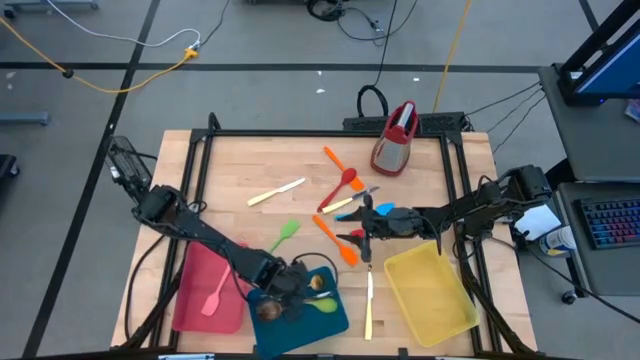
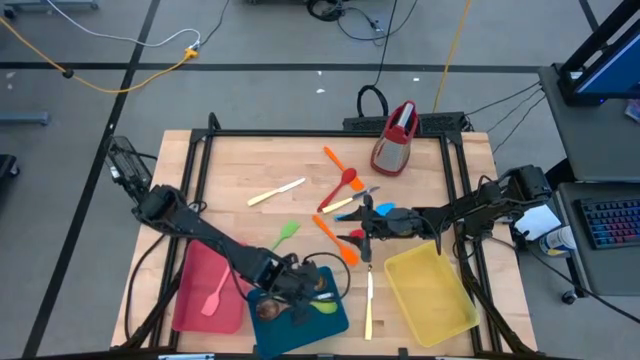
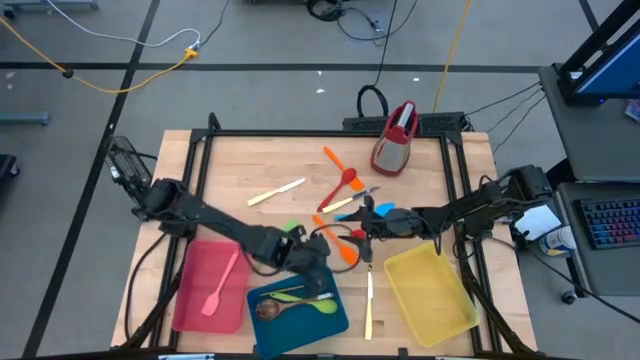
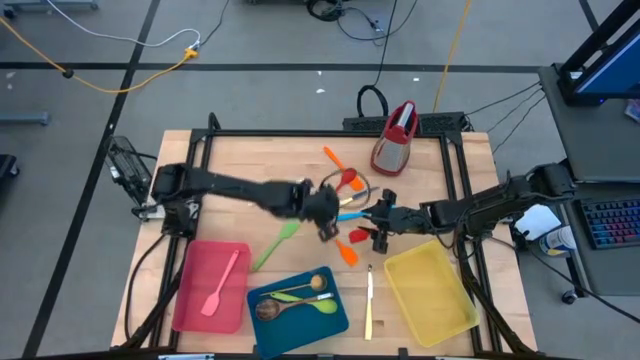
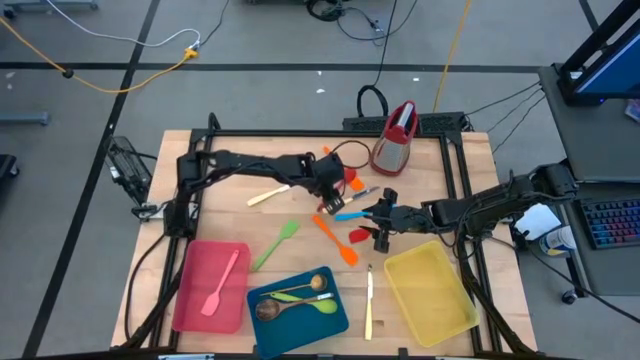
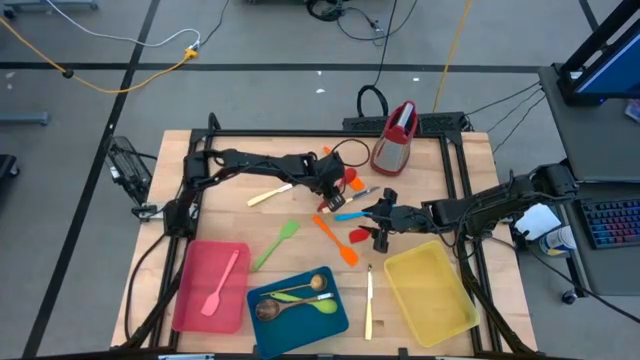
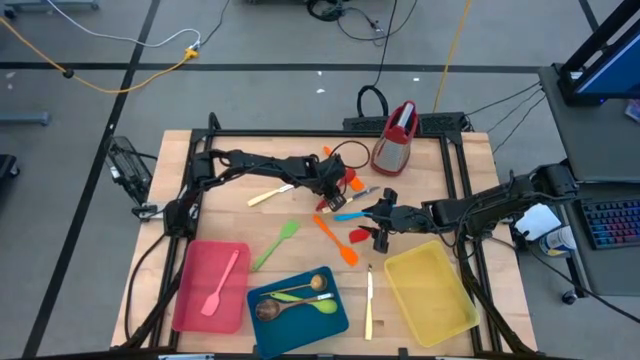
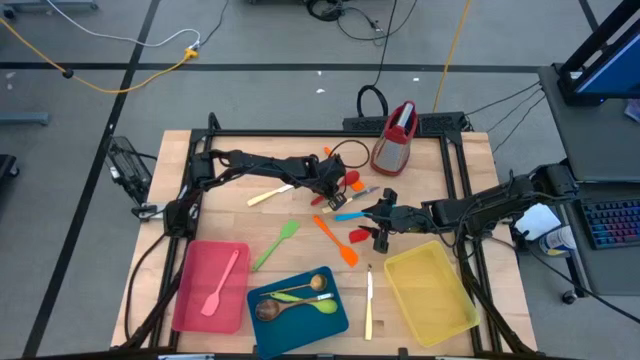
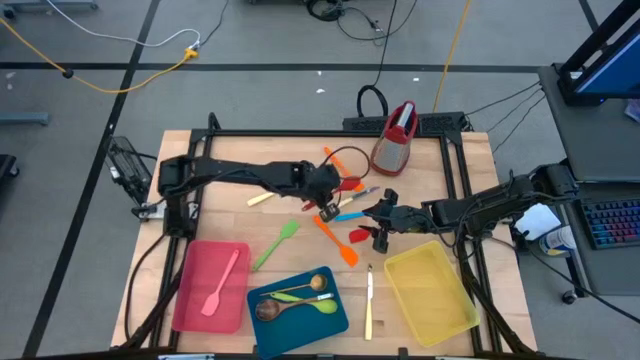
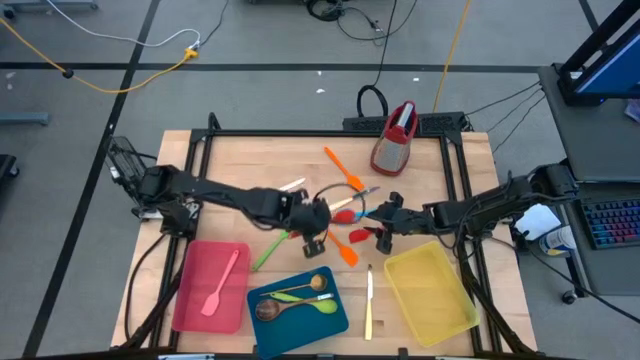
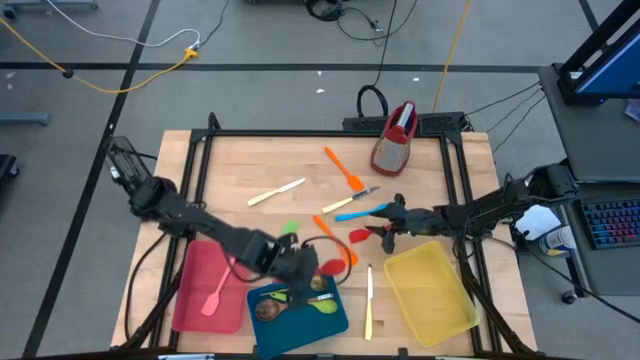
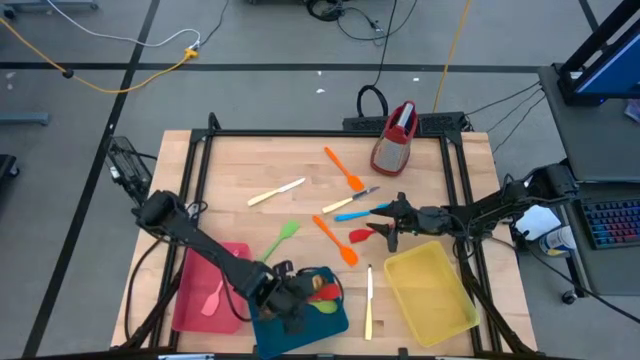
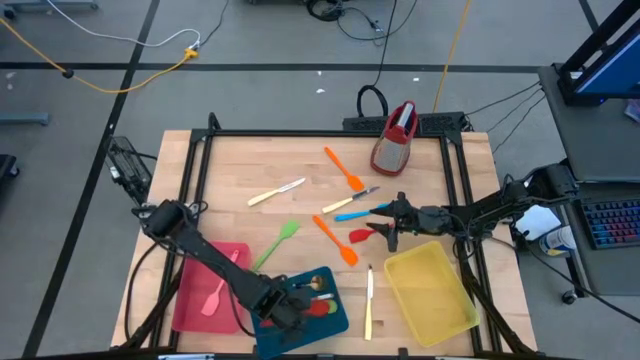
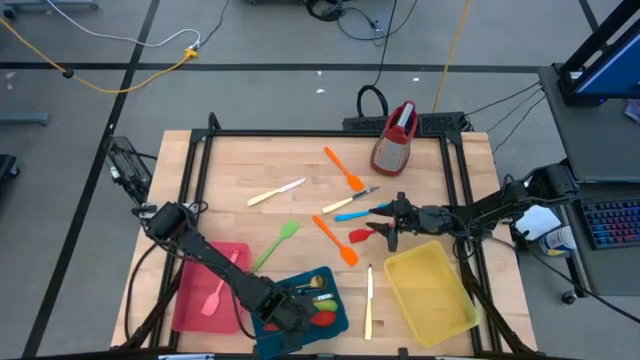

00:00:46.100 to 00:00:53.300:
Task: Pick & Place Kitchen Items
Put the red serving spoon into the blue bin

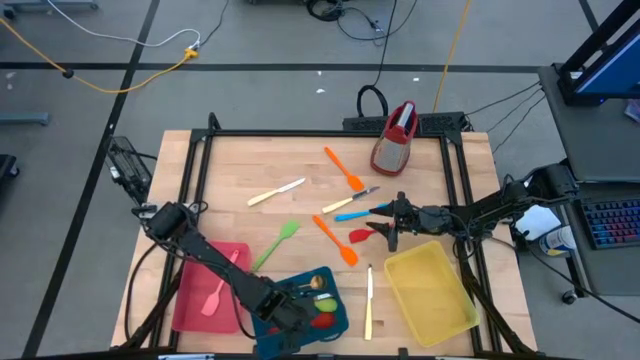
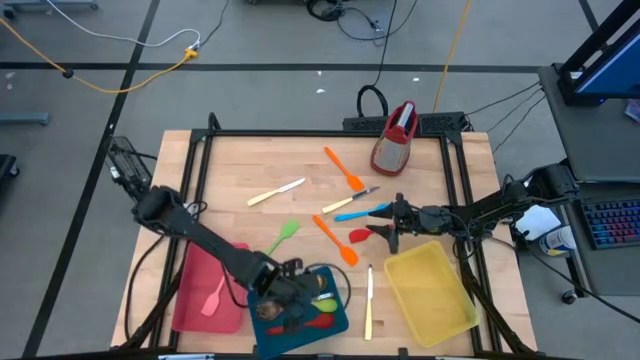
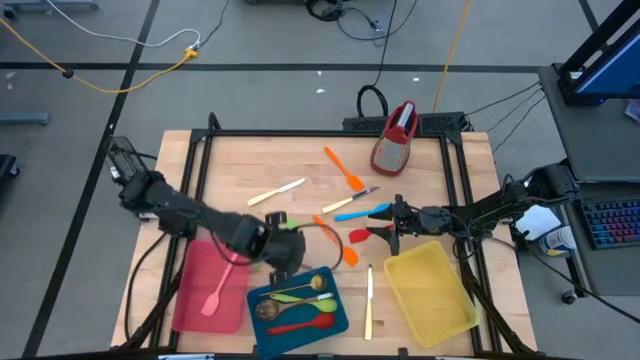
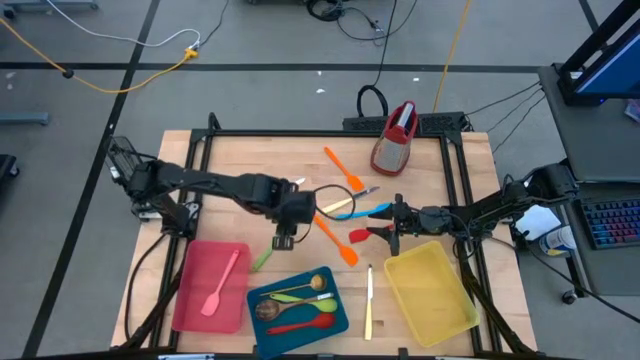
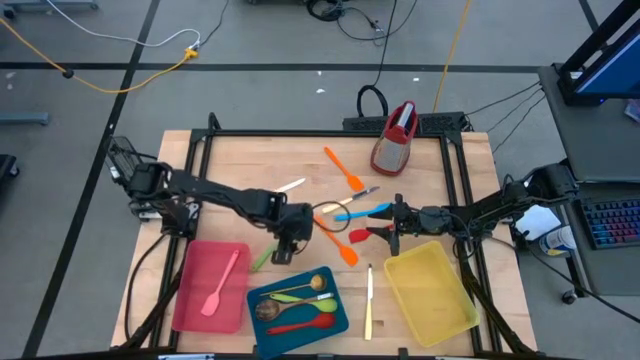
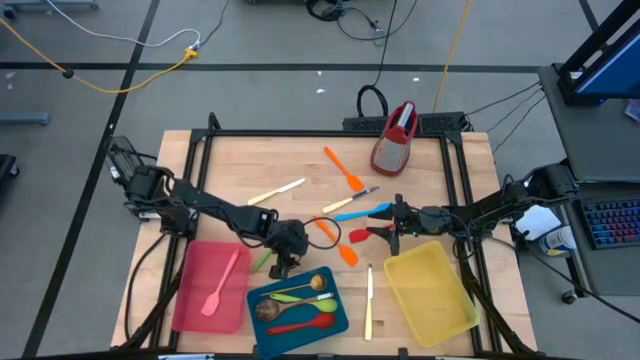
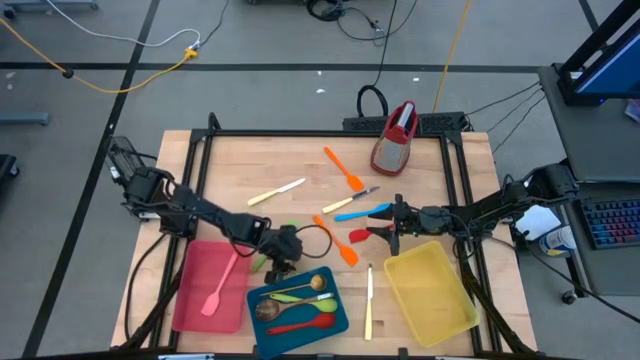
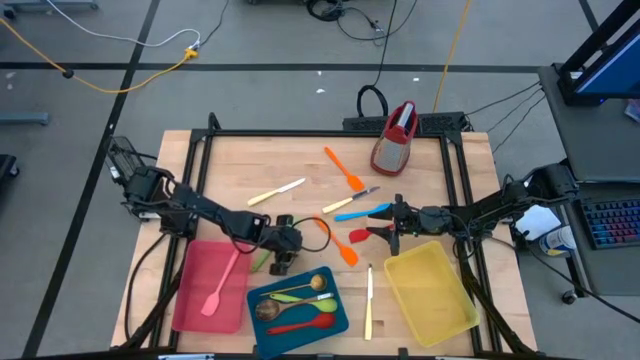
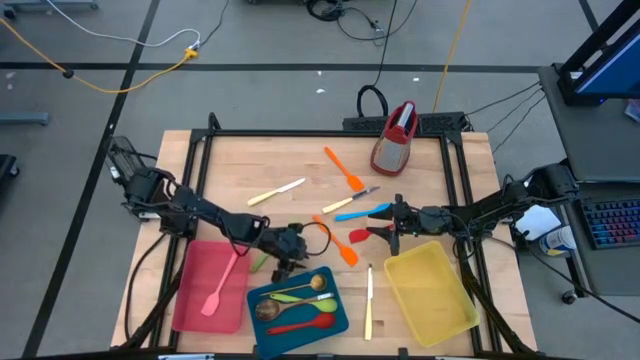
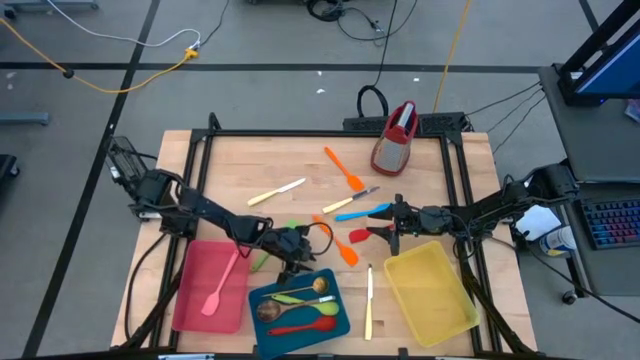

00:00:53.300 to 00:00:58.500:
Adjust the blue bin

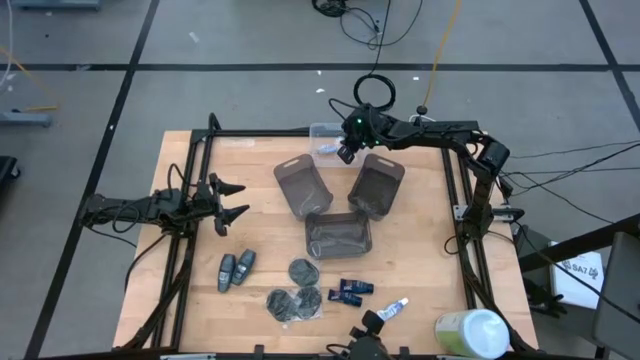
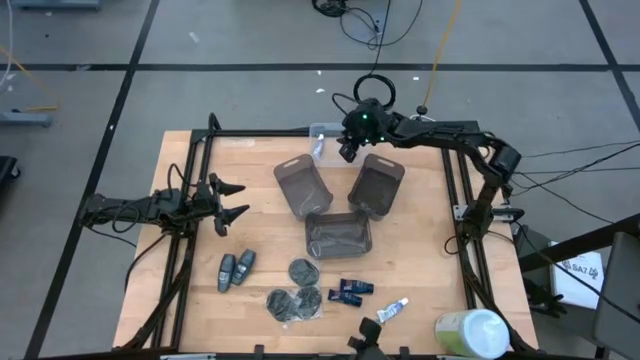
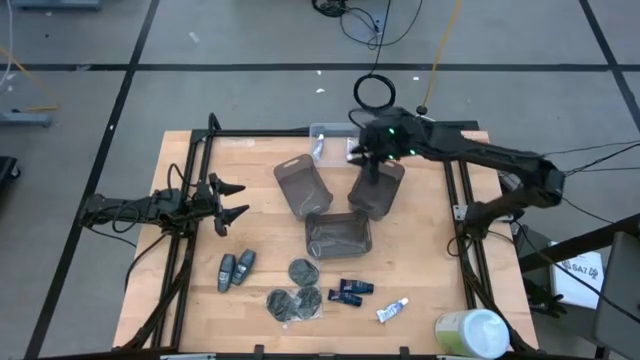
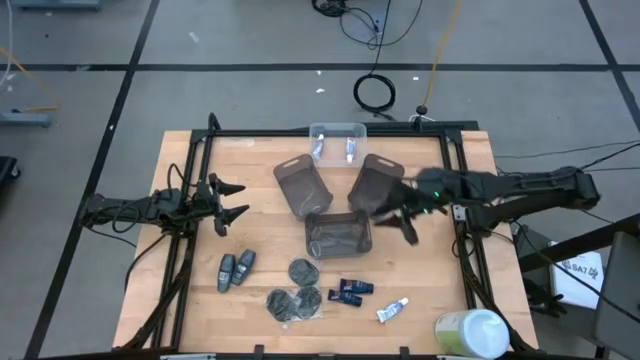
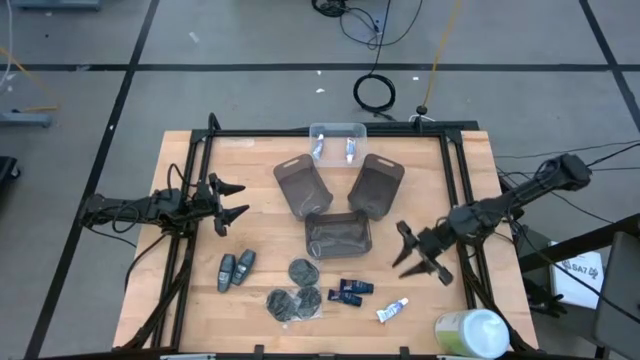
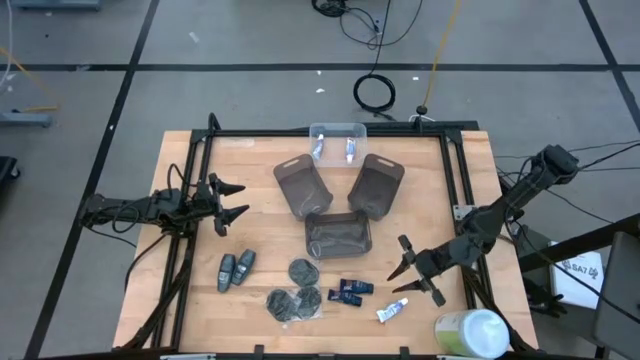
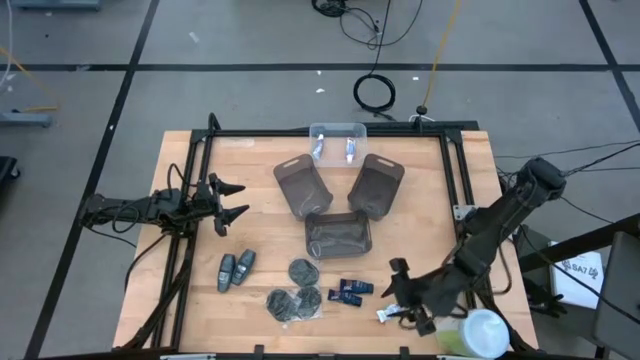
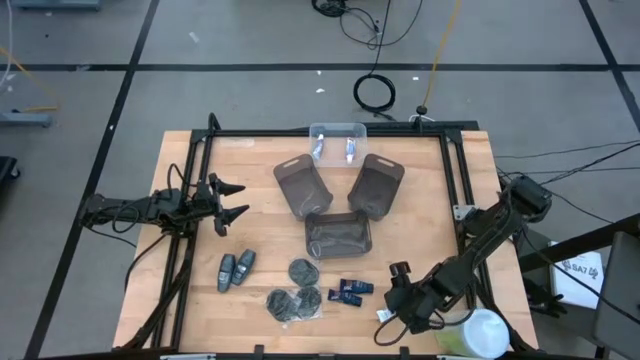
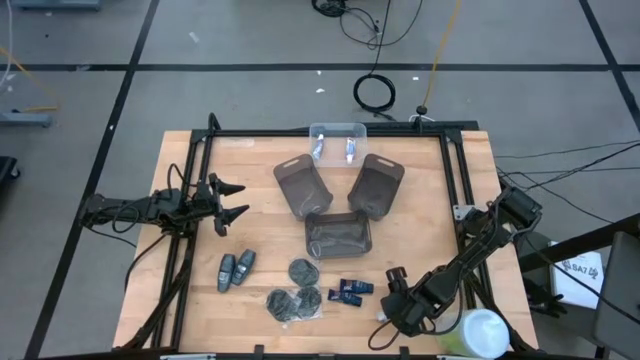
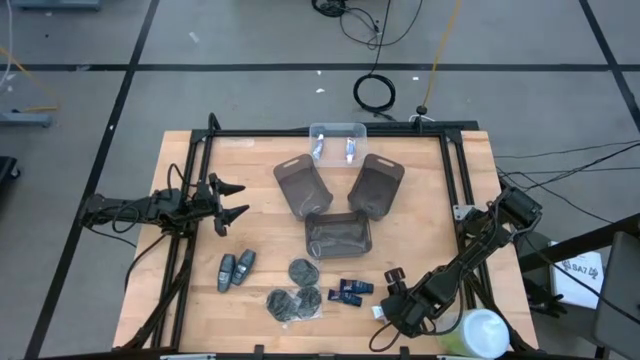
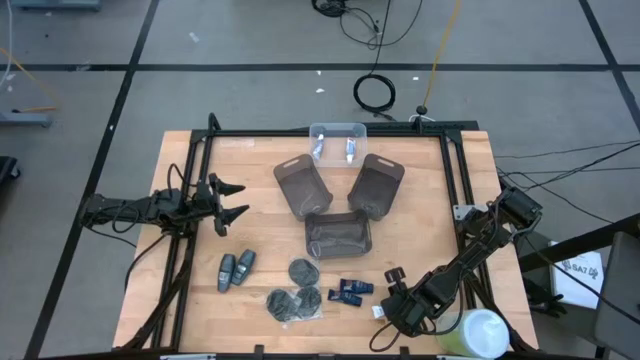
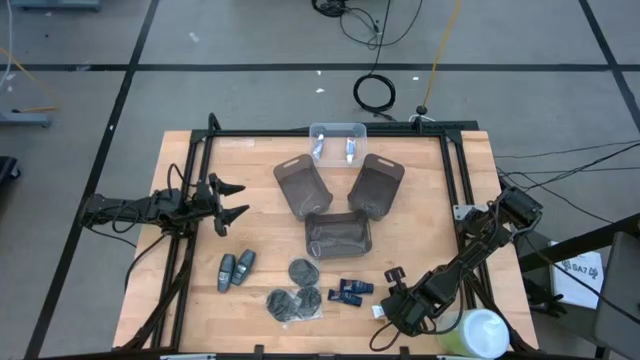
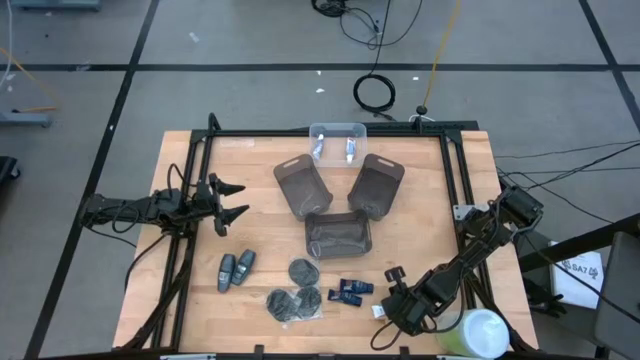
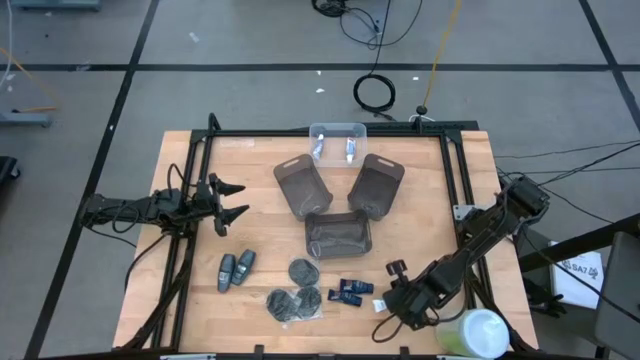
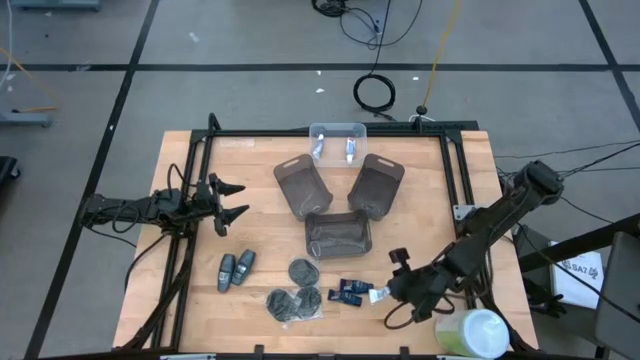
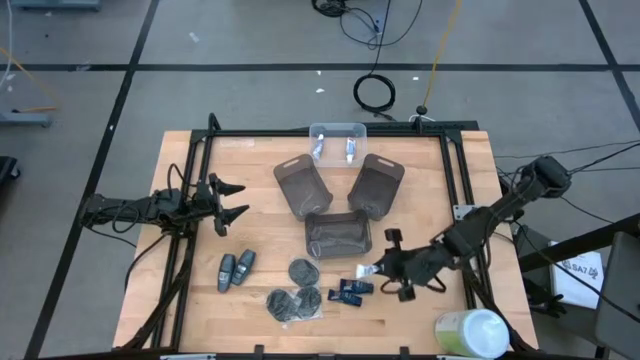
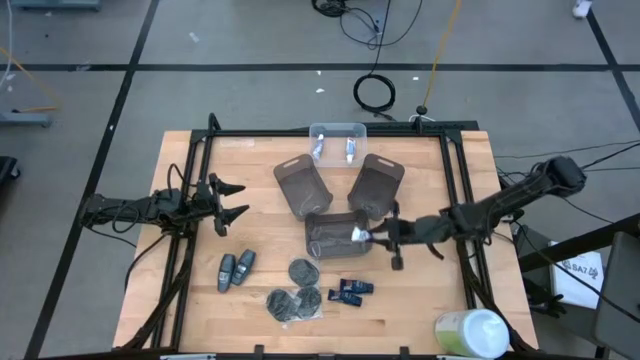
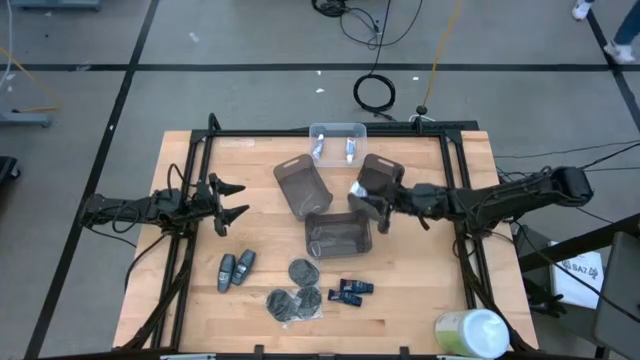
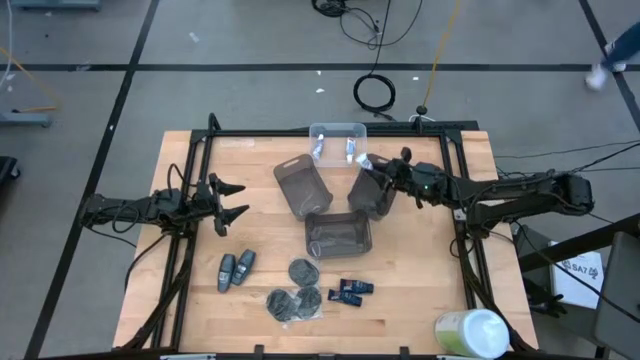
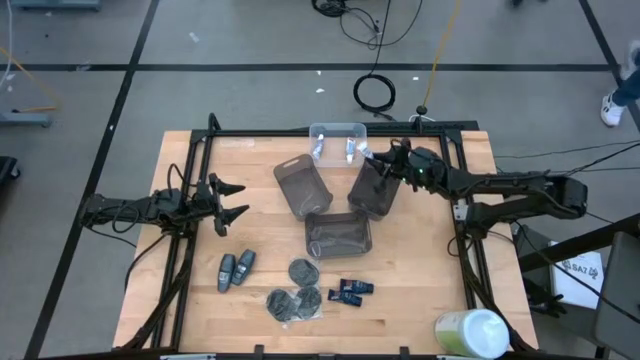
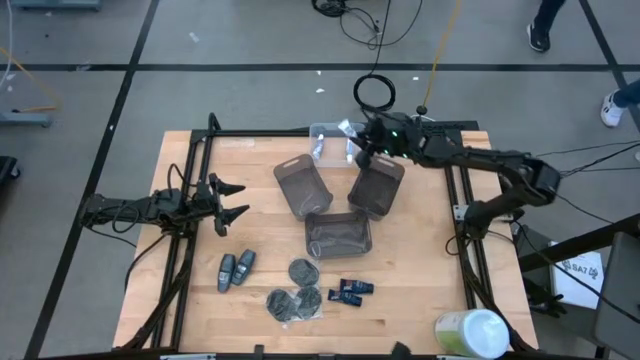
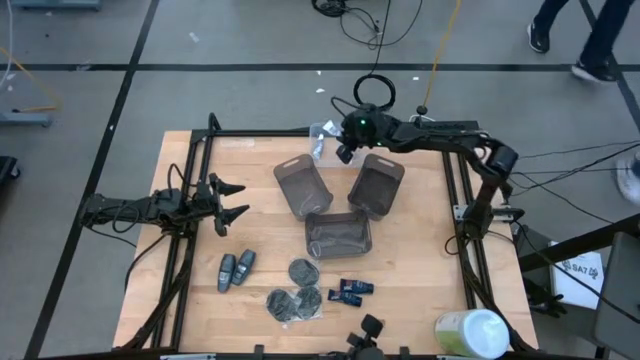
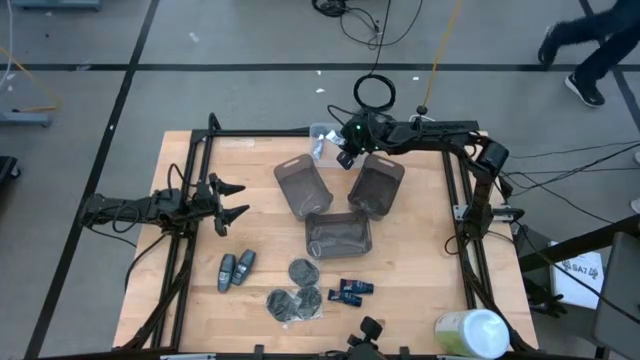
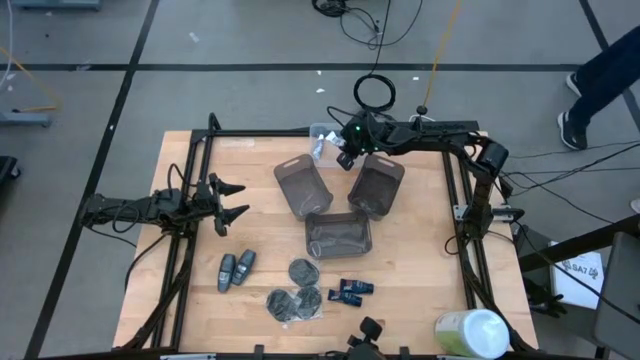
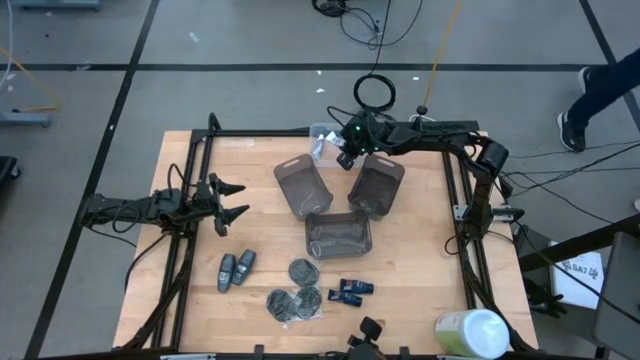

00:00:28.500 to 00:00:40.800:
Task: Pick & Place Travel size toiletries
Put the white toothpaste tube into the white transparent bin
